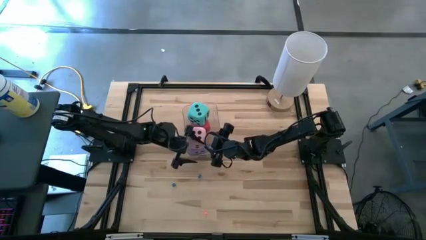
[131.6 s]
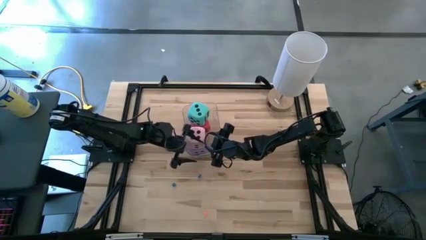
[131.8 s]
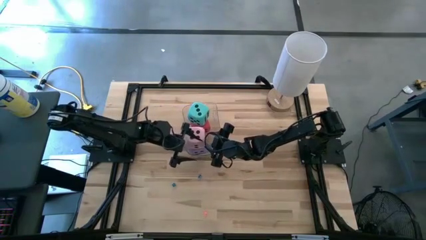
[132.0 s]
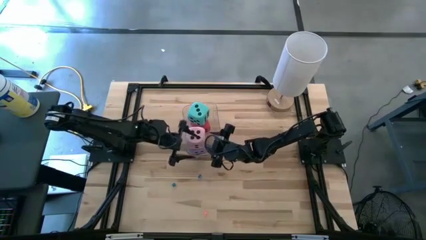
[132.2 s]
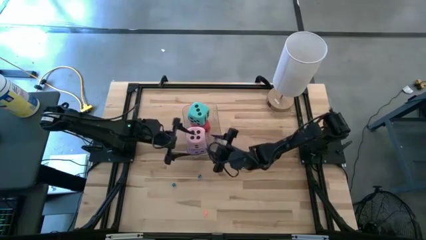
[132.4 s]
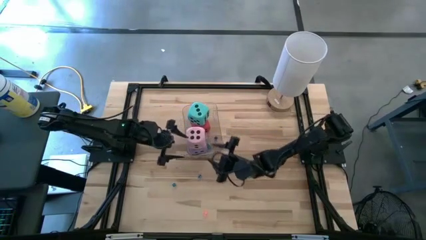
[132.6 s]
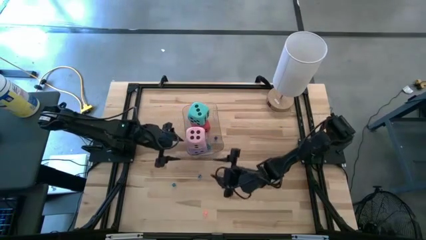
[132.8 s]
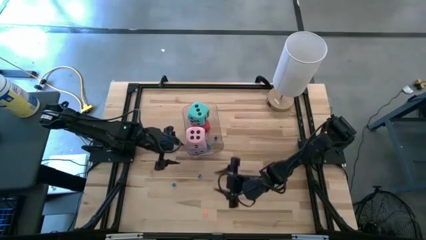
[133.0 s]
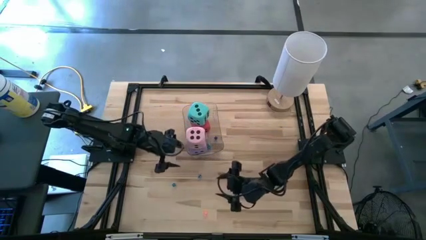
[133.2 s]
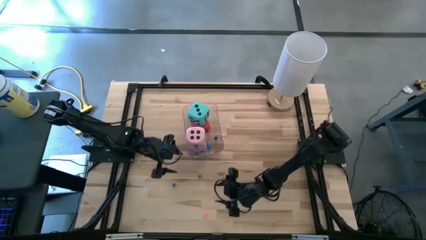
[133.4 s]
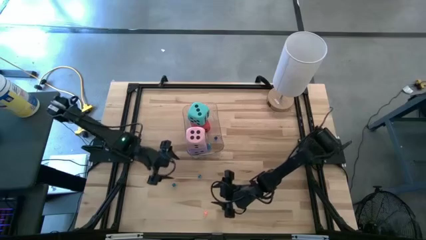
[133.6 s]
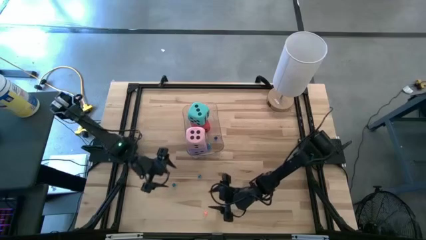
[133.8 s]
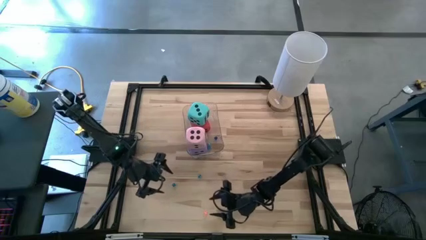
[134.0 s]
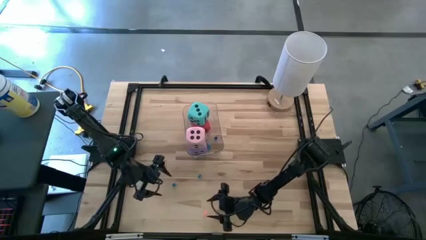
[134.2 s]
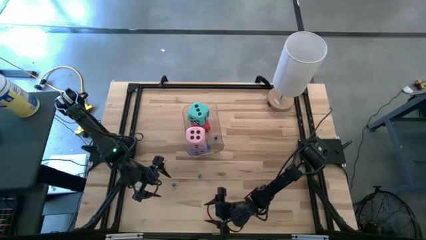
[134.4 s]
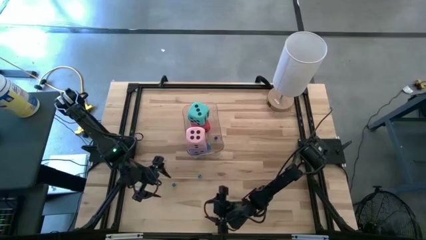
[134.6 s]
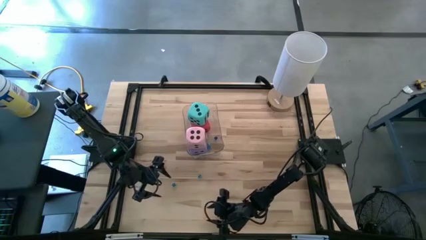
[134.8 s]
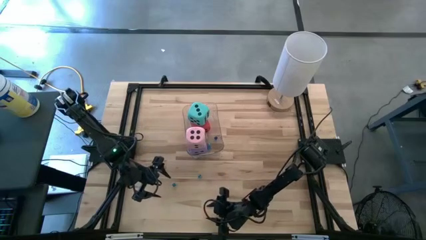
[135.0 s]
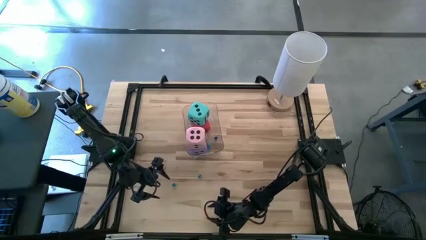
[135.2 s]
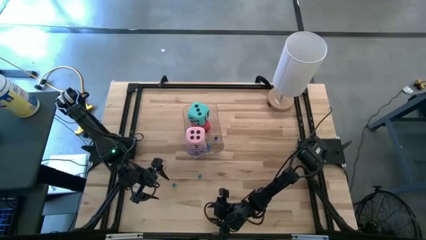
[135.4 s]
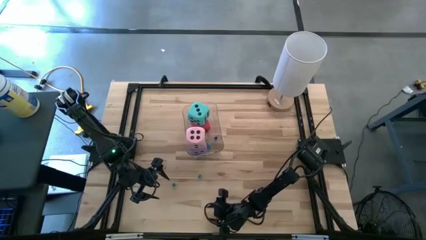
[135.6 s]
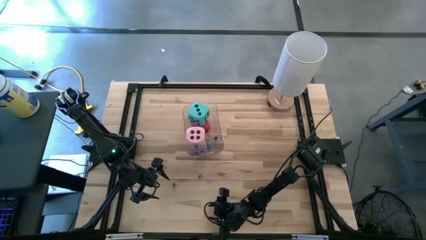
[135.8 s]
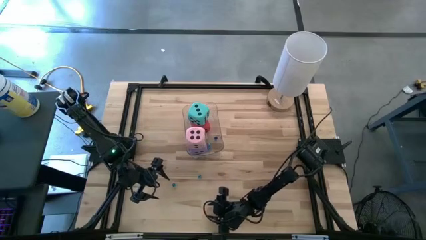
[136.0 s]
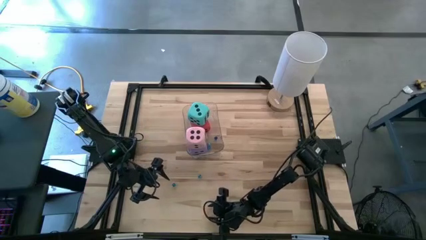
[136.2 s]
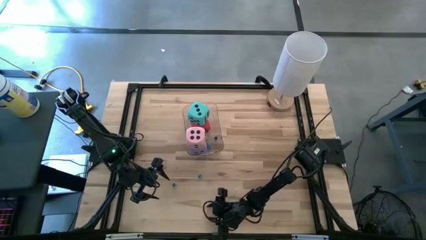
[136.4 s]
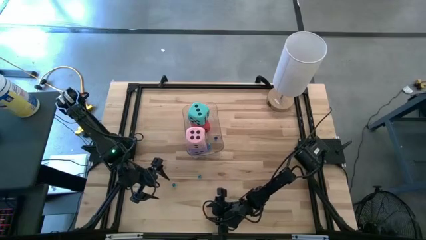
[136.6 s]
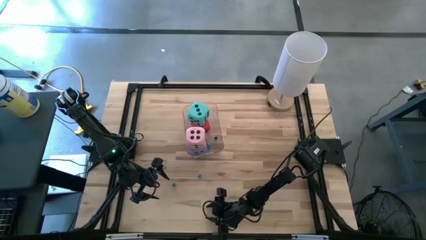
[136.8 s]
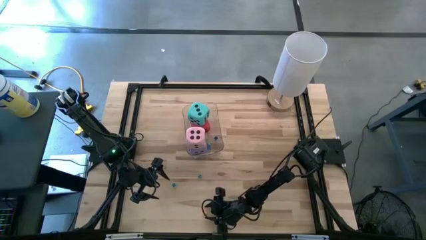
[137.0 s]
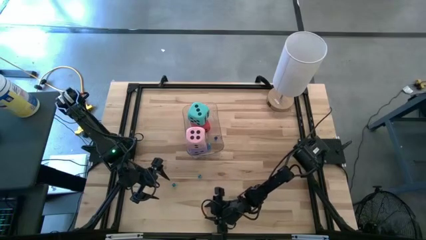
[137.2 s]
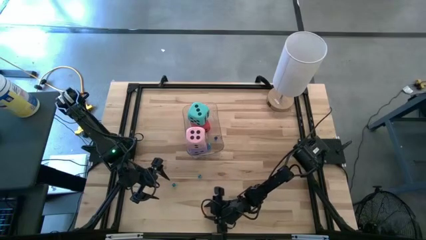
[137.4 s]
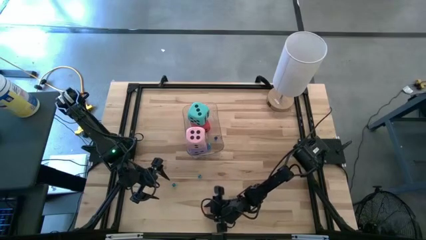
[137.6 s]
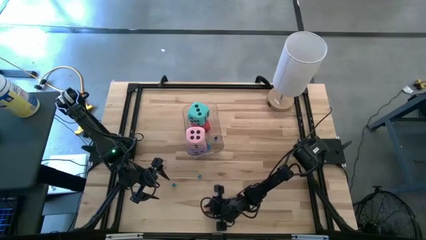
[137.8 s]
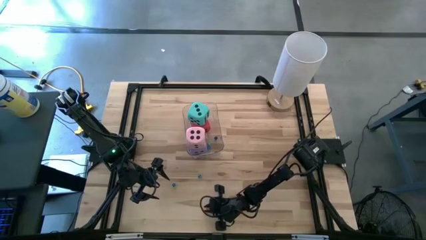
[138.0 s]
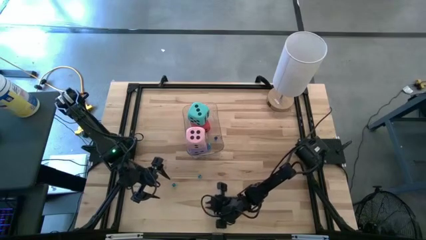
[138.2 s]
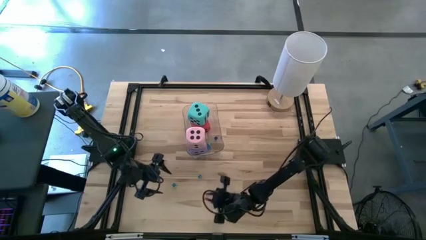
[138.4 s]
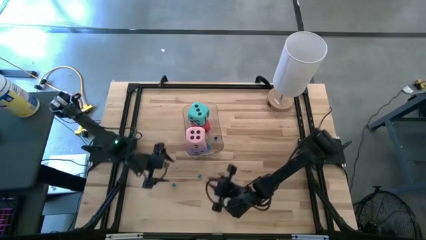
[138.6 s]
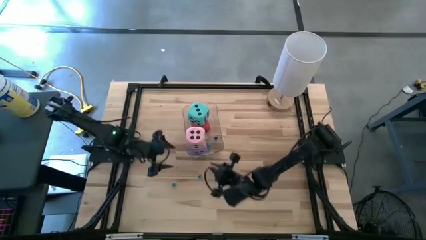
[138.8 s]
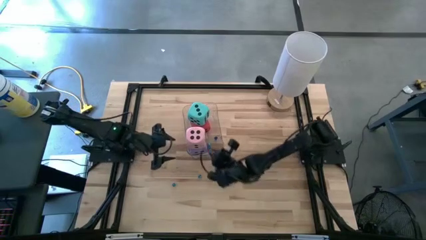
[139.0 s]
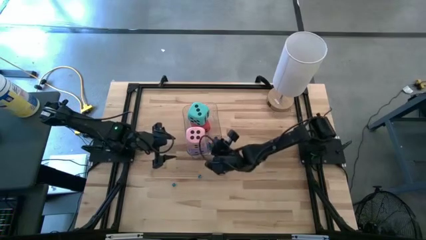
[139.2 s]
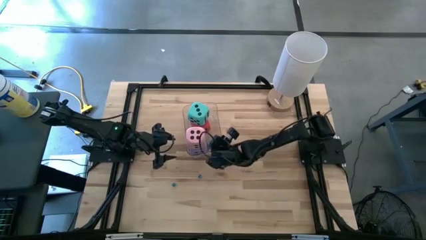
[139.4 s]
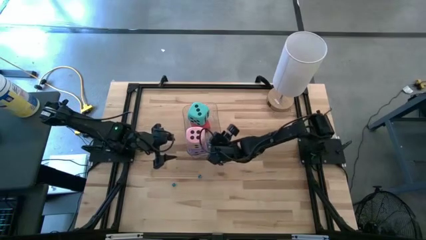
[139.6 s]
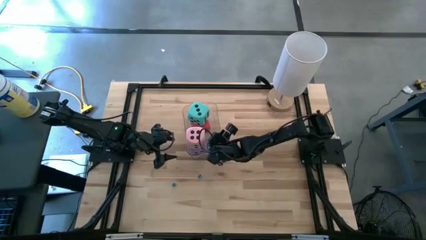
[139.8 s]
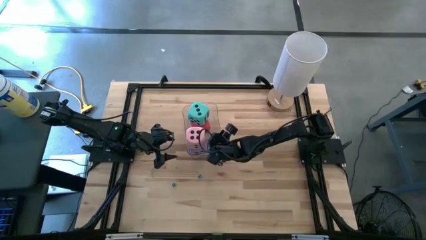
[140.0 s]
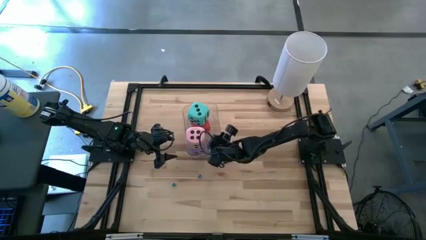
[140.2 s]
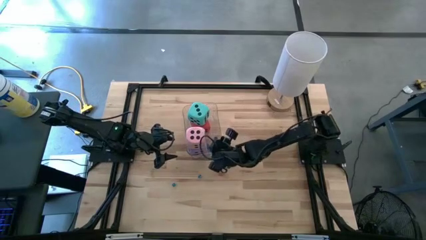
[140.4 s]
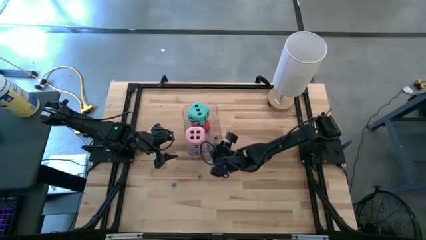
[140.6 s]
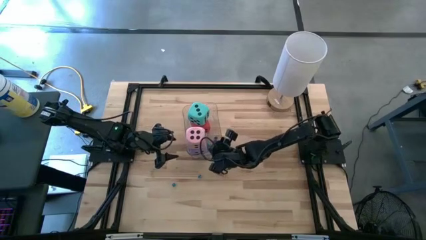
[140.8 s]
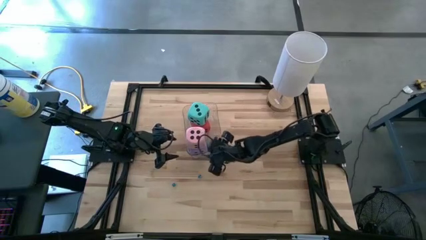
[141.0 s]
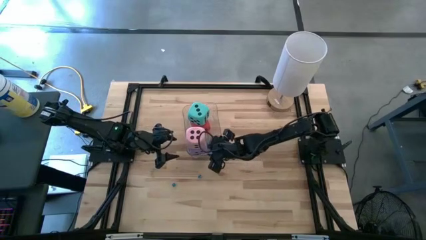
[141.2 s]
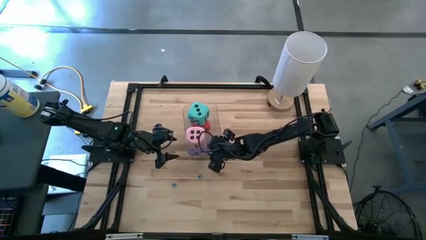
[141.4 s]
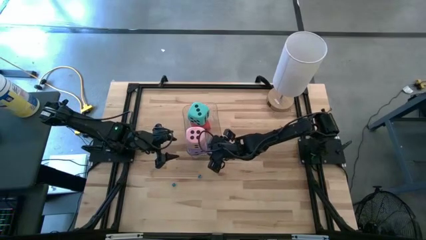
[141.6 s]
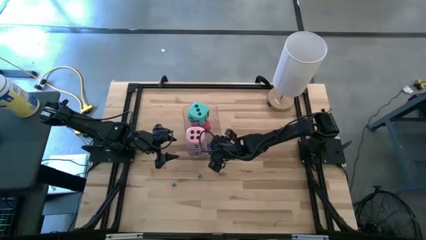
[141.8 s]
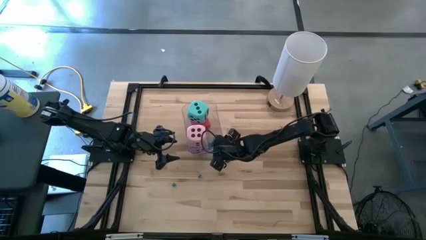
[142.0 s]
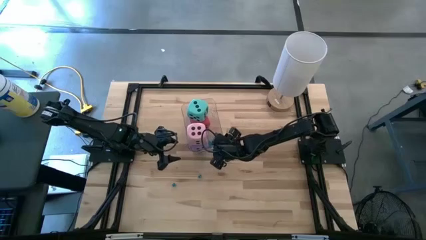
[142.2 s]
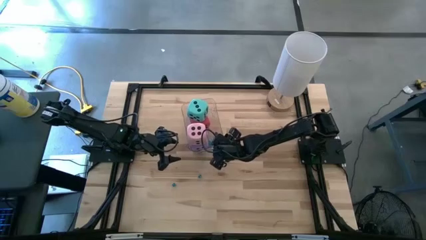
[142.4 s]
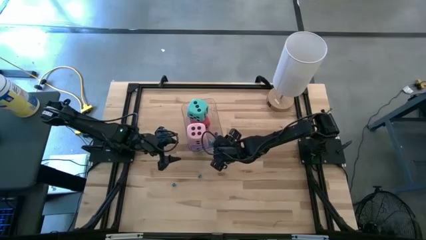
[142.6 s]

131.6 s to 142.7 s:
Task: Pick & Place Dice
Put the small orange die into the transparent bin

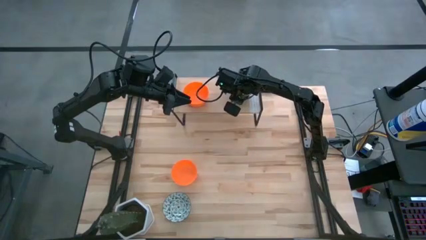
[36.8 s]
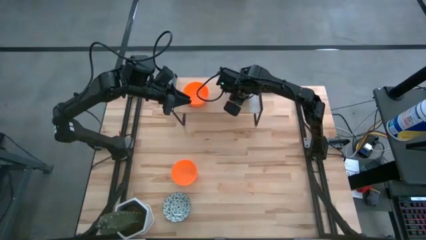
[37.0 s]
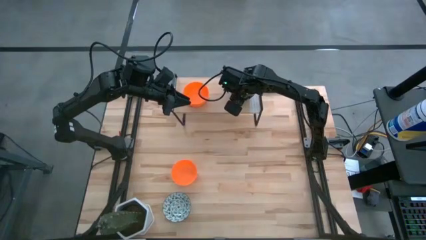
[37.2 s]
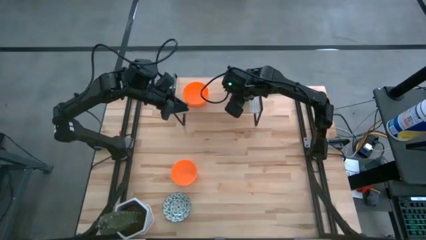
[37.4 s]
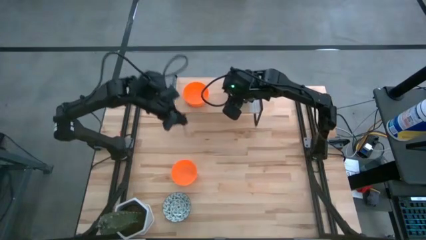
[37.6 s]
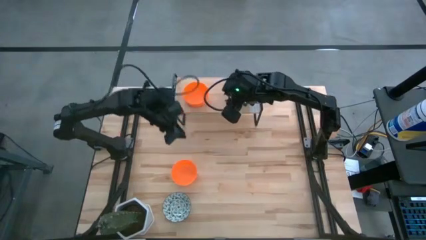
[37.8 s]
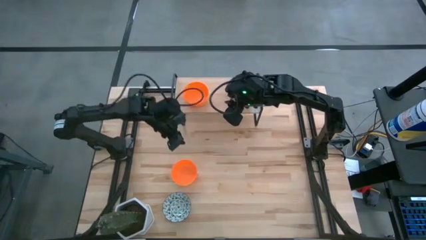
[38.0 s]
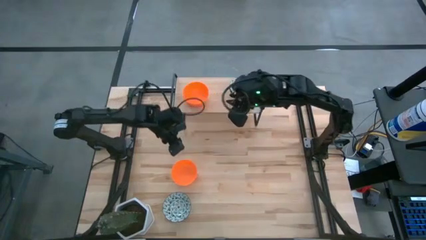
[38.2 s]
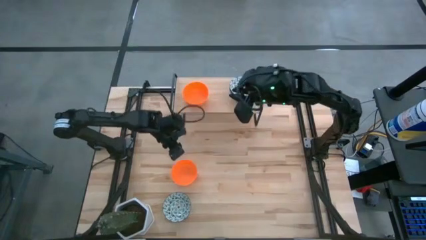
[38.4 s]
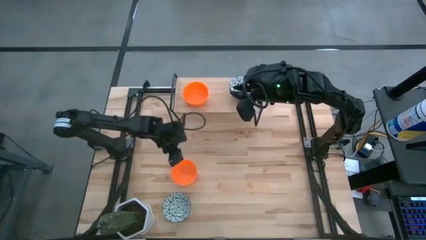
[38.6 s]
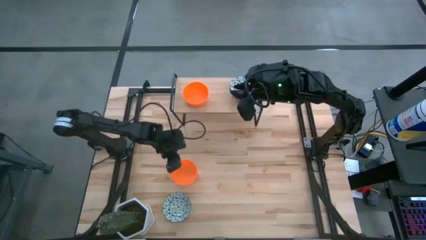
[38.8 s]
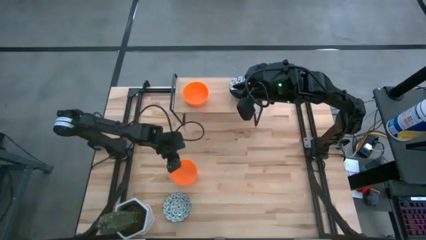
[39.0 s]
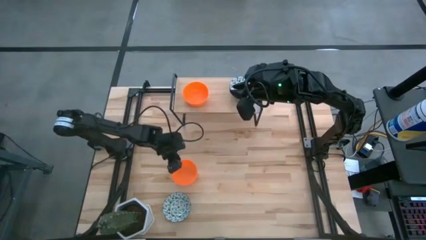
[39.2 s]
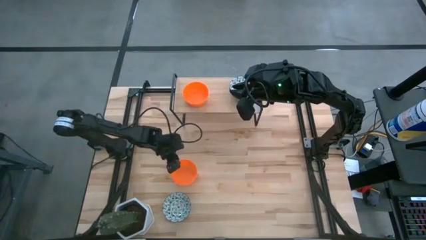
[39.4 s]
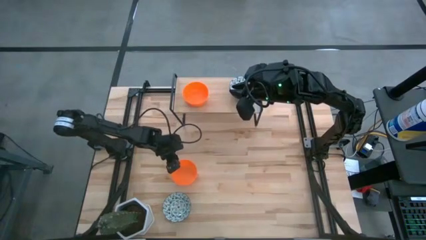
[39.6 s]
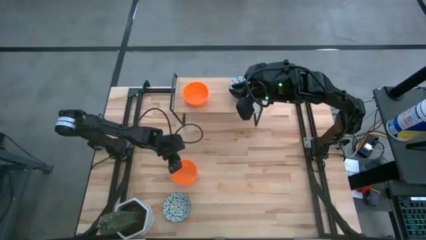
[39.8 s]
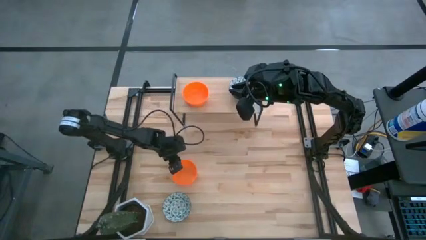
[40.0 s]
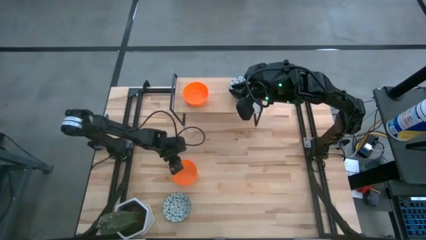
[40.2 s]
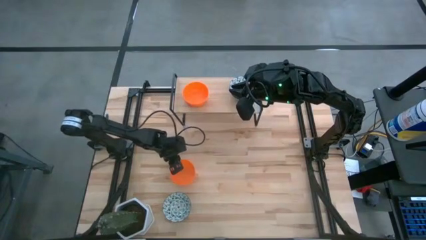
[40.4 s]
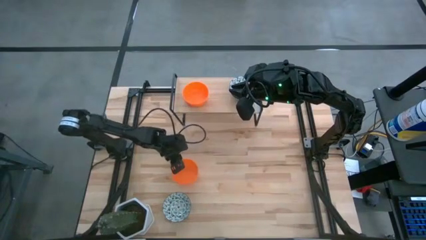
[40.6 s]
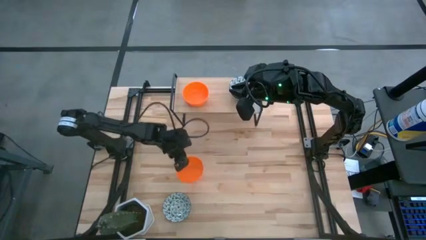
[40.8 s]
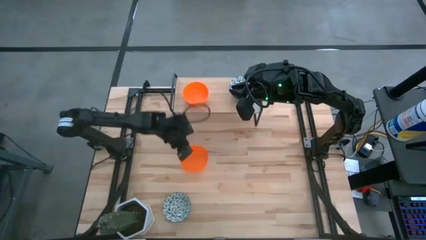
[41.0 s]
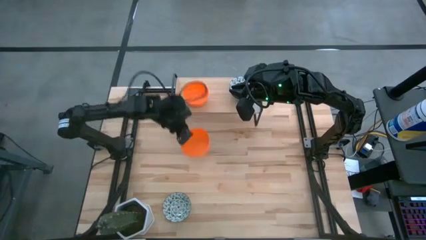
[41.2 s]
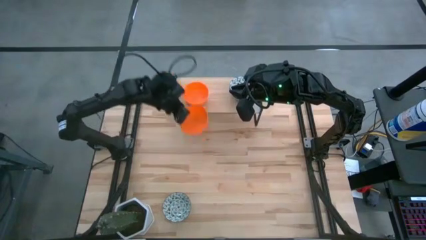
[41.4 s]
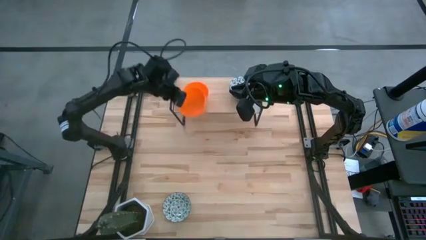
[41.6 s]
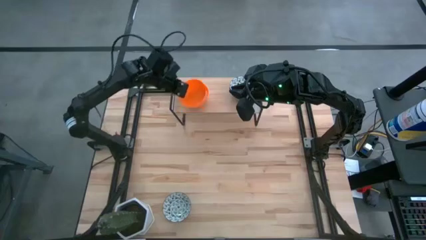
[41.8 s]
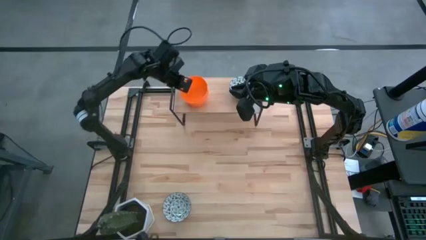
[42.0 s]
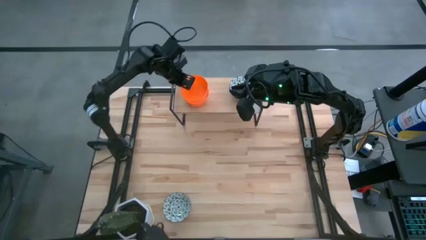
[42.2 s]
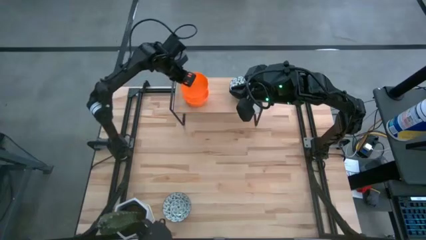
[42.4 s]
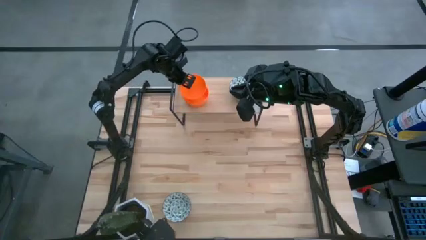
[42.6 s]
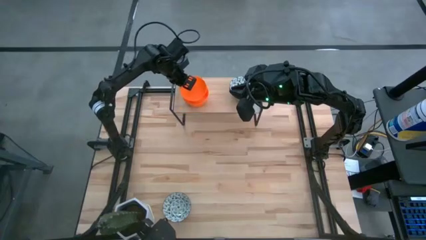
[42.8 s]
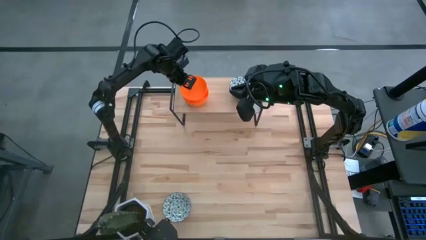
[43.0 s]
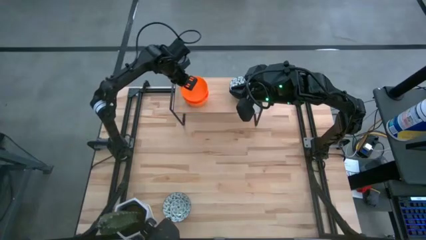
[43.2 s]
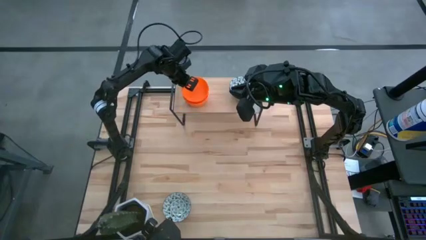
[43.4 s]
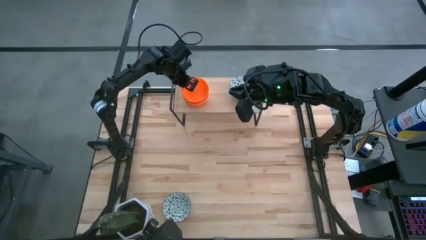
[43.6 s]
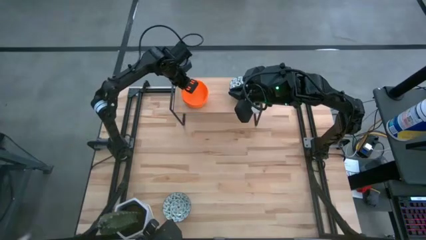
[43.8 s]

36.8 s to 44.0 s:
Task: Pick & Place Mini bowls
Stack the orange bowl on top of the orange bowls on the shelf
